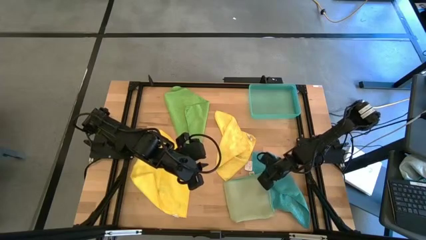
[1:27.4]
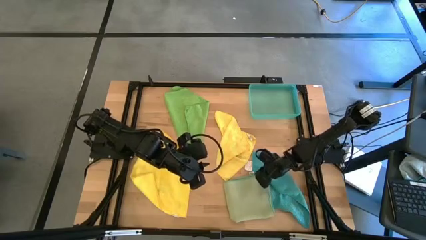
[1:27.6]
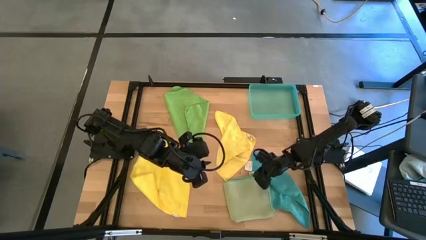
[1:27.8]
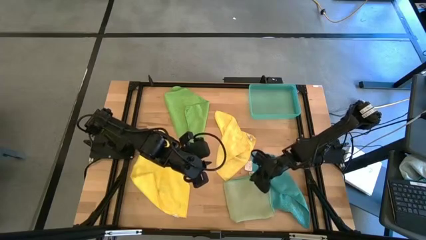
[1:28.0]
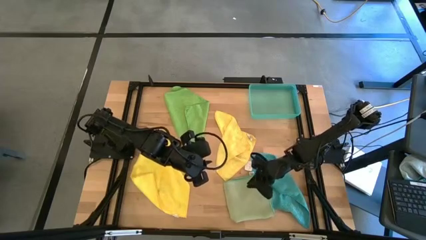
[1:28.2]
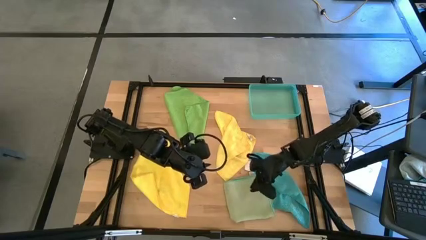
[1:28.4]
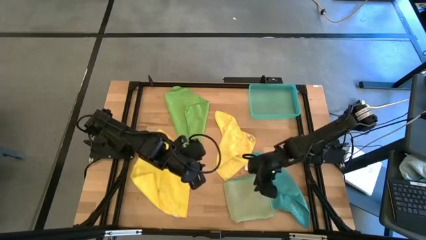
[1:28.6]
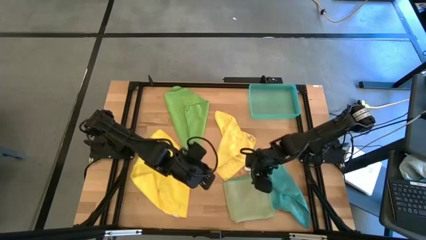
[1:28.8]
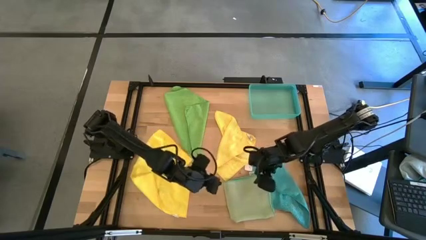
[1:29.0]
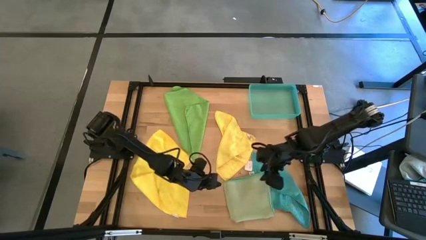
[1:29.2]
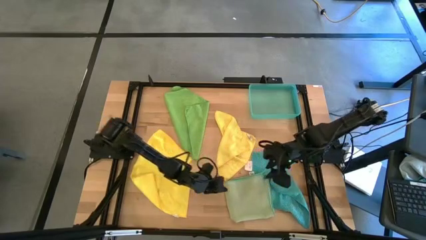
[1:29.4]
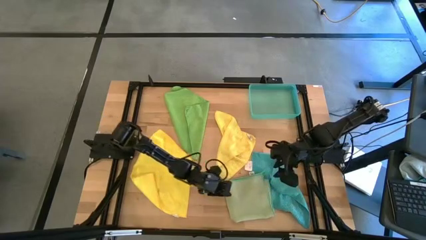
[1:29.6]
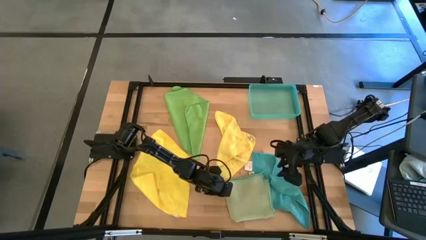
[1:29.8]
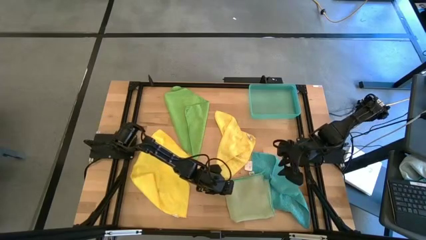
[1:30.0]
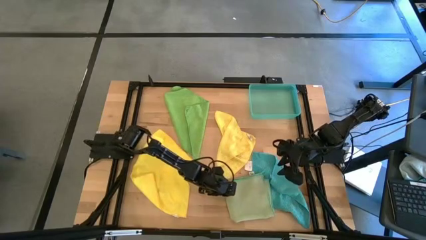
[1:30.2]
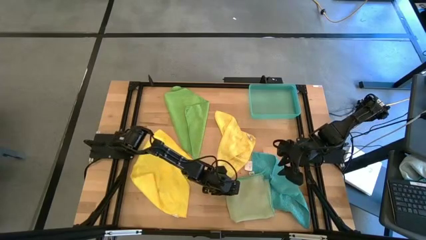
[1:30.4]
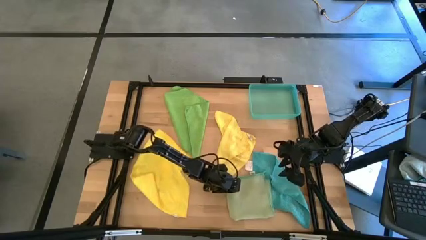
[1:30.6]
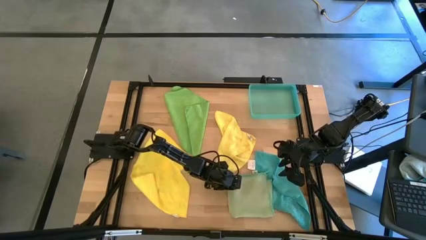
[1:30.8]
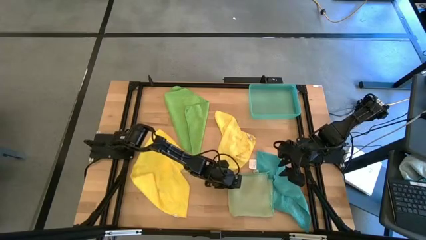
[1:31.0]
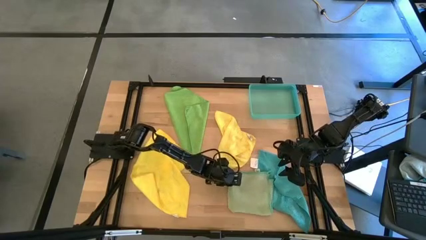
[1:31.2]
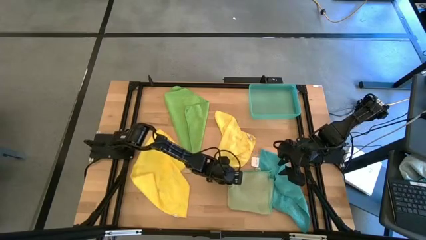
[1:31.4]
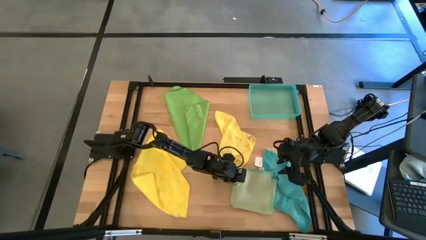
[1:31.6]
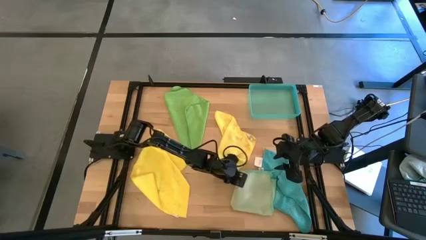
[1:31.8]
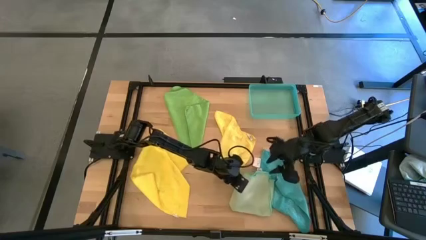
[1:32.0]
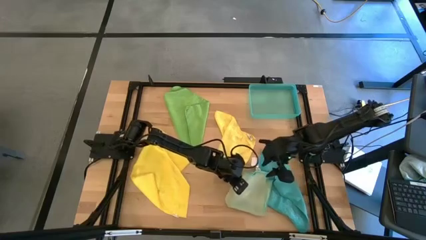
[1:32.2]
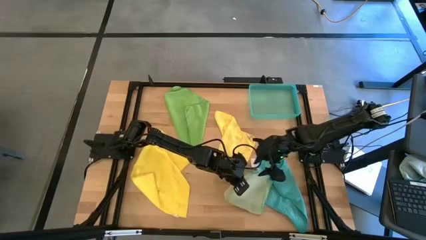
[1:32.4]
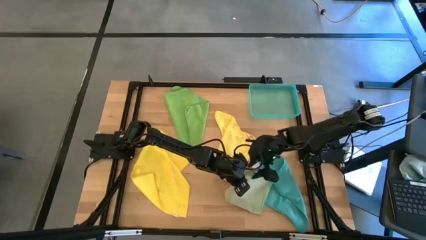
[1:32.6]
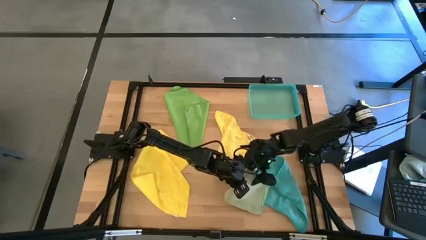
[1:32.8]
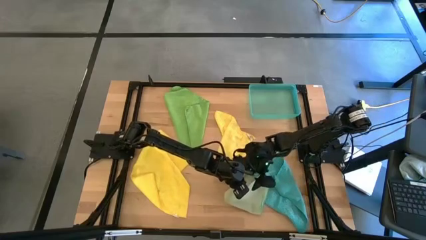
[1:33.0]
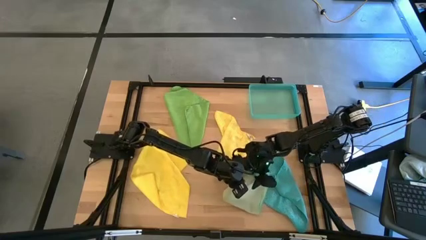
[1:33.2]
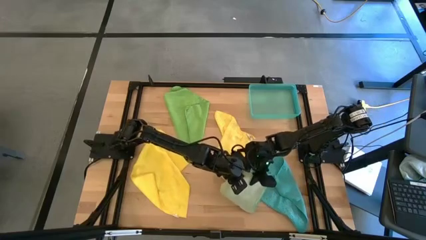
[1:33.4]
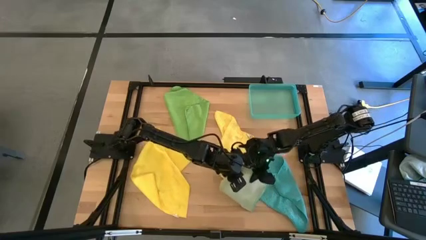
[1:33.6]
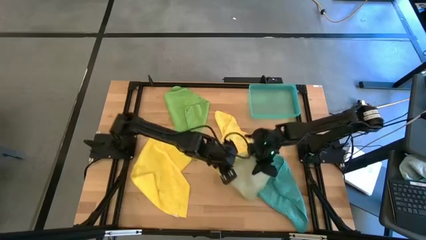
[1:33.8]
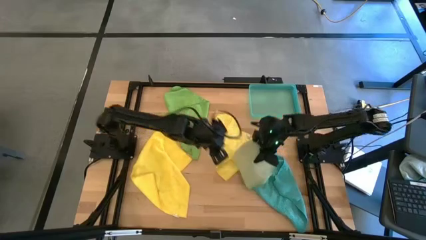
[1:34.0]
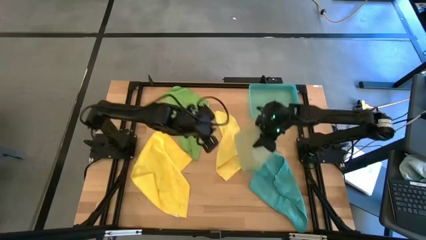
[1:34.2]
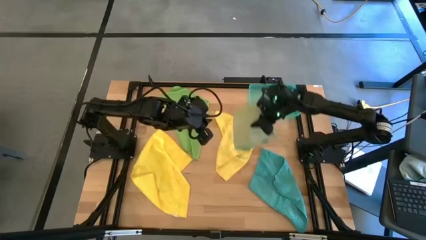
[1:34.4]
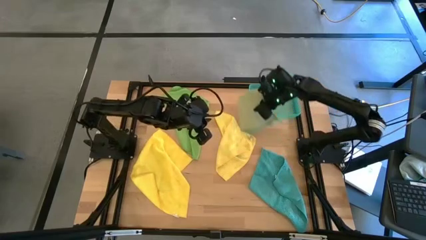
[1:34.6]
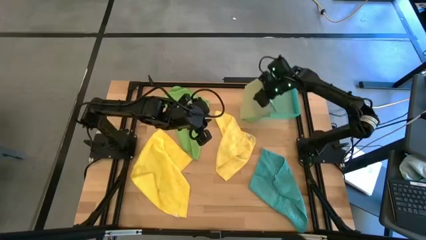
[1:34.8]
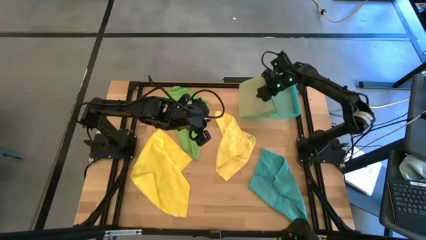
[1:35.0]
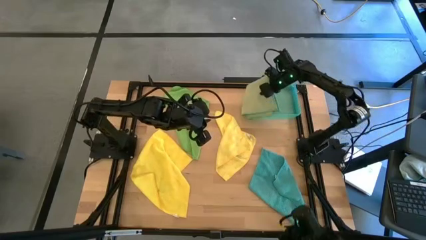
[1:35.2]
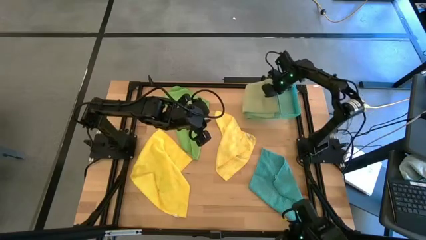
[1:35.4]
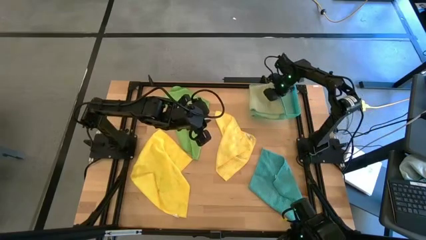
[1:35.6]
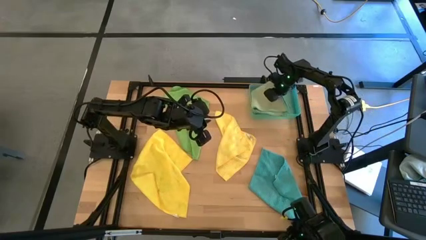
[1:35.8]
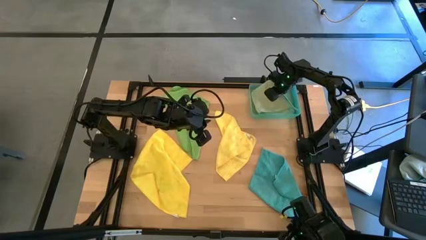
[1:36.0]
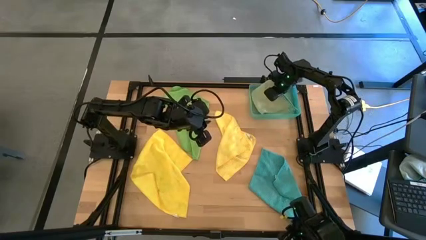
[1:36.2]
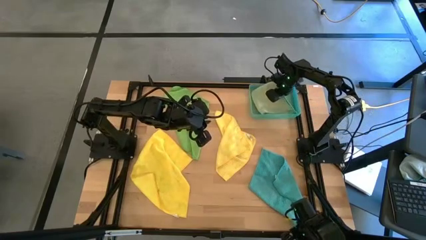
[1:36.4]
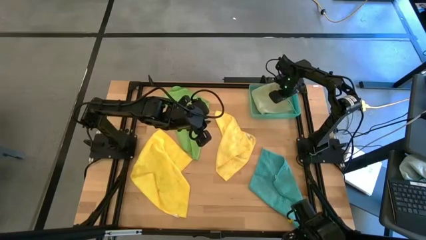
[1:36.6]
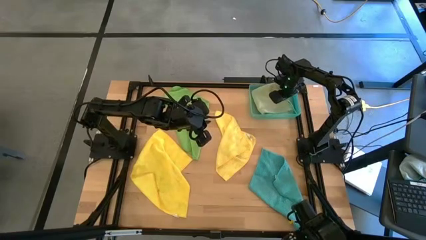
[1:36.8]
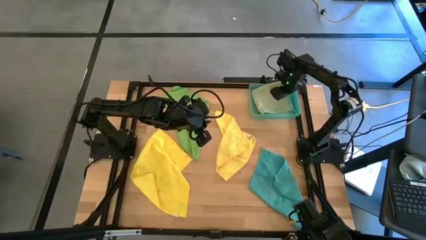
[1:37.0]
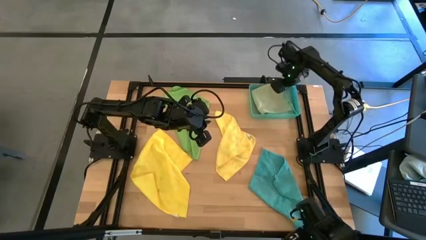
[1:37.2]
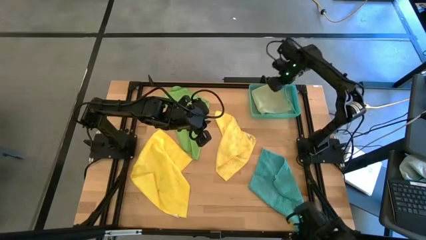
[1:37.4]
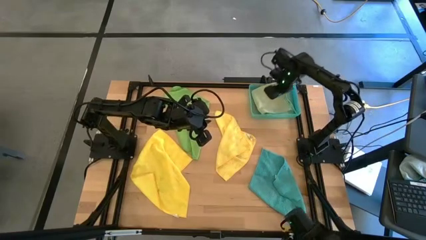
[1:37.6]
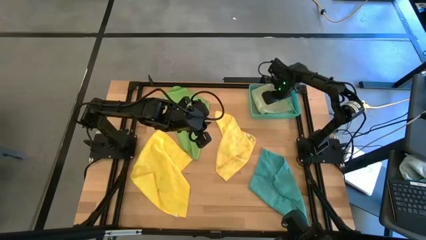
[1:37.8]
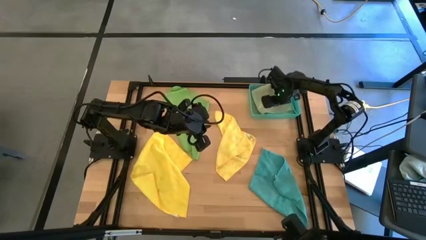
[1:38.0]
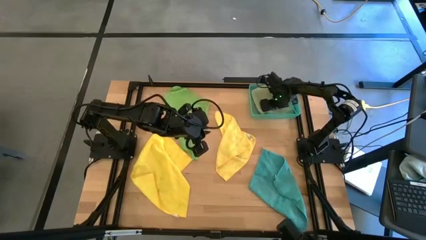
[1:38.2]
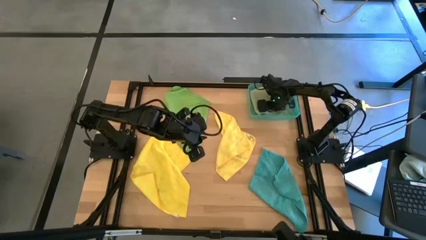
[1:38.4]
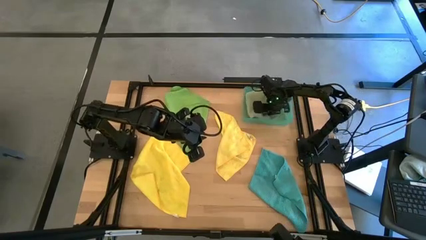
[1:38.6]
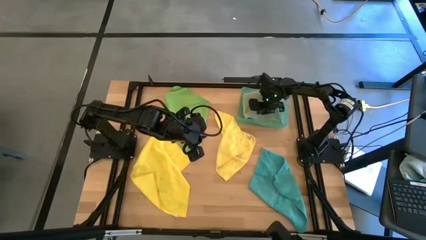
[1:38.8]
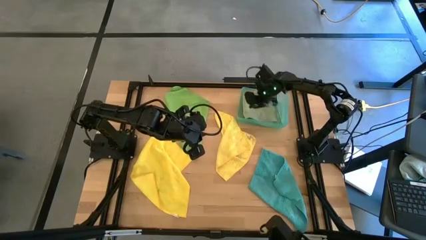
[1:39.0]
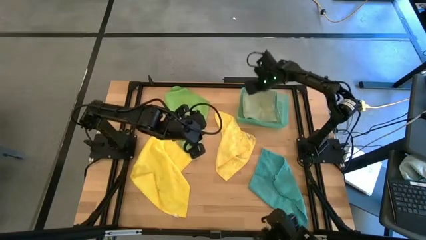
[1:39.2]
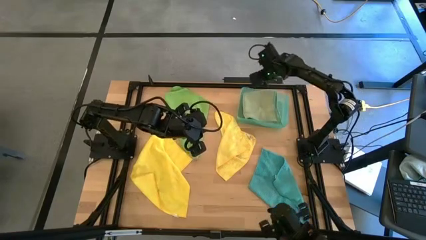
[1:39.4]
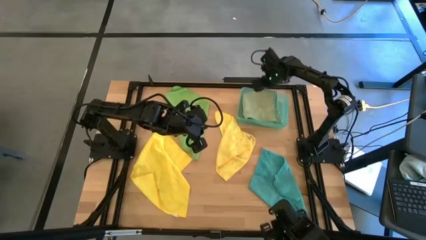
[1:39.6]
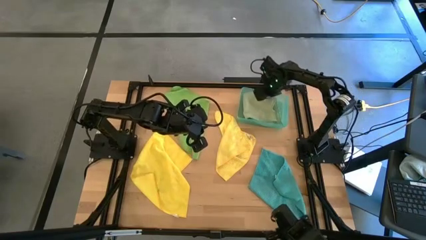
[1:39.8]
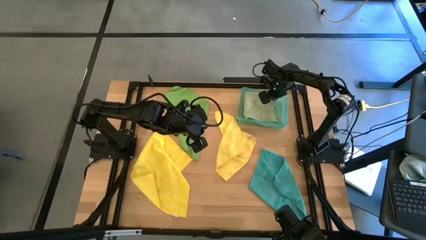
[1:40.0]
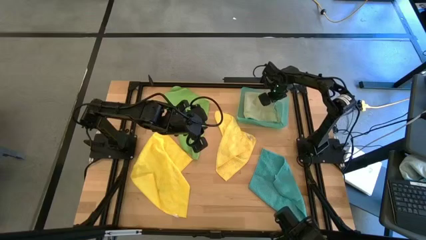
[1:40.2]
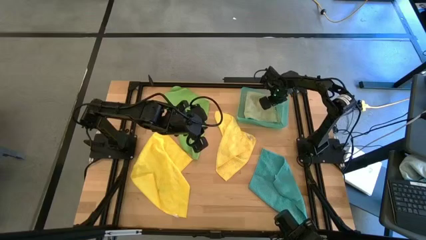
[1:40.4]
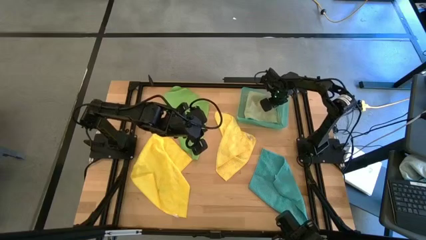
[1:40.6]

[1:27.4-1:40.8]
Task: Fold microfiber towels
Put the folded light green microfiber cloth into the blue bin

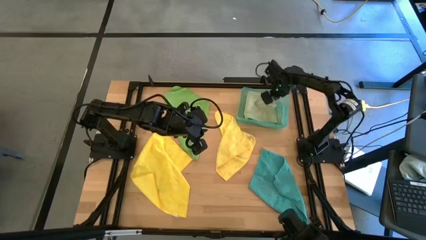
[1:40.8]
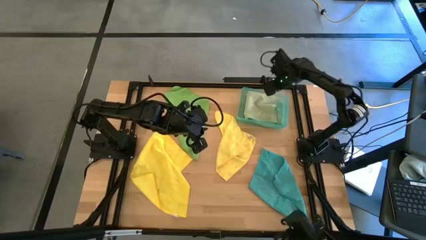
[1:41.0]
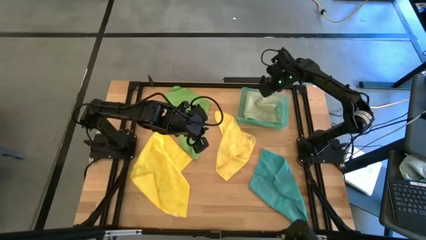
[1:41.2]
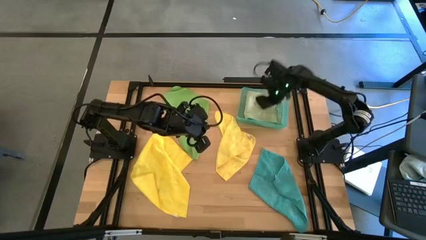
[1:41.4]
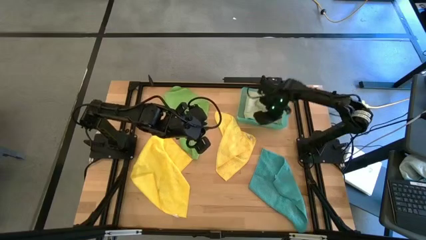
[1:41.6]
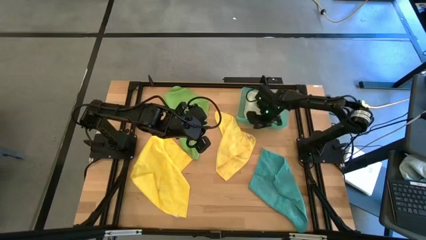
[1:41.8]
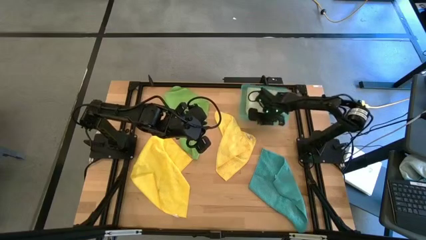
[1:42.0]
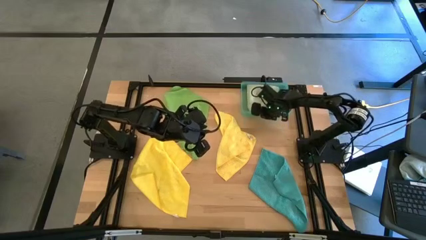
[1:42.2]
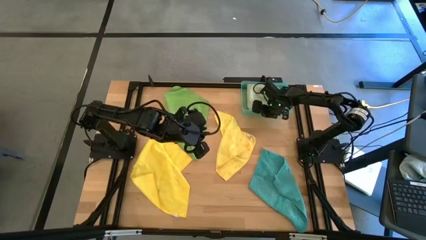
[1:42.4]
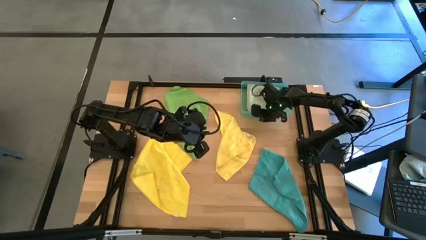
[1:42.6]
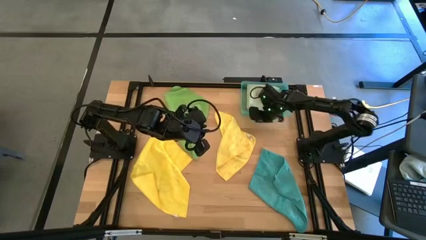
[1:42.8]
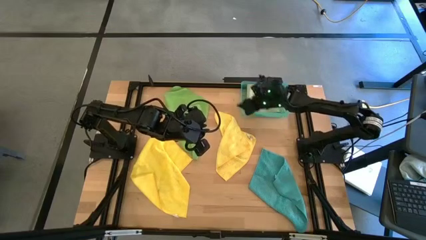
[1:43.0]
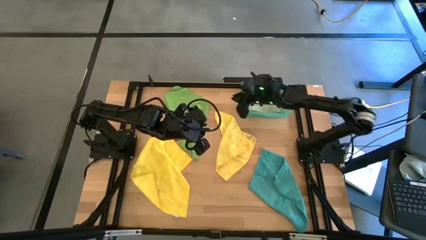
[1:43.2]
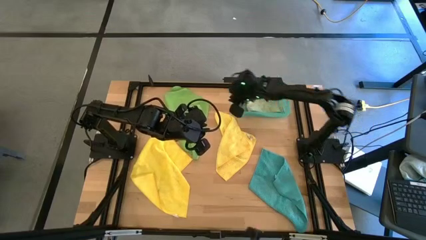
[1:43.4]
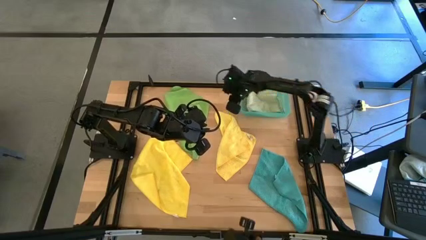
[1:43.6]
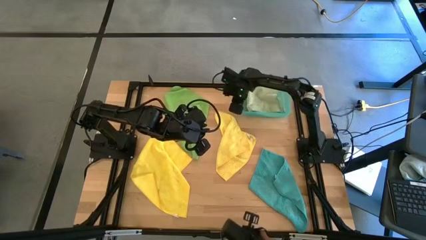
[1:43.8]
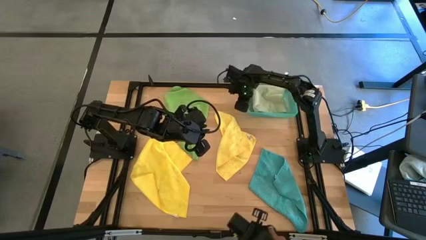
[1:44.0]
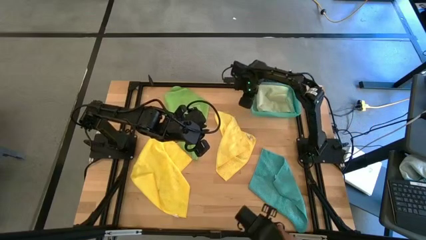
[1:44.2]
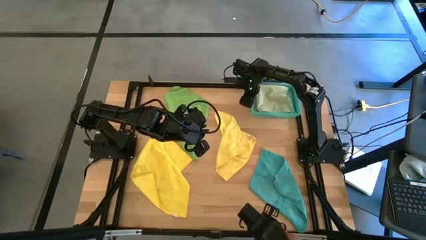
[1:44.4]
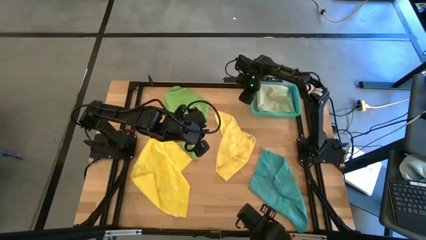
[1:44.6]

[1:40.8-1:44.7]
Adjust the blue bin
